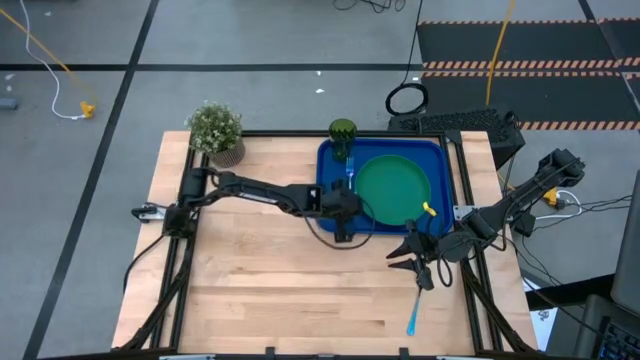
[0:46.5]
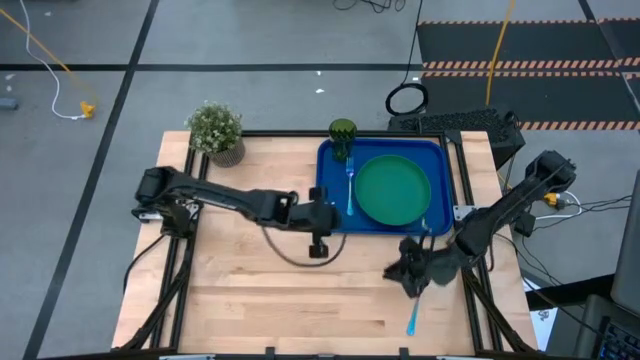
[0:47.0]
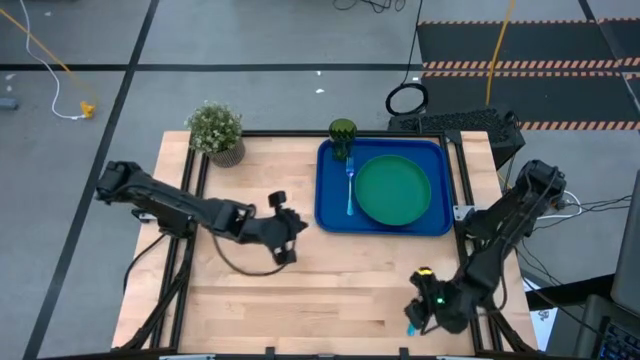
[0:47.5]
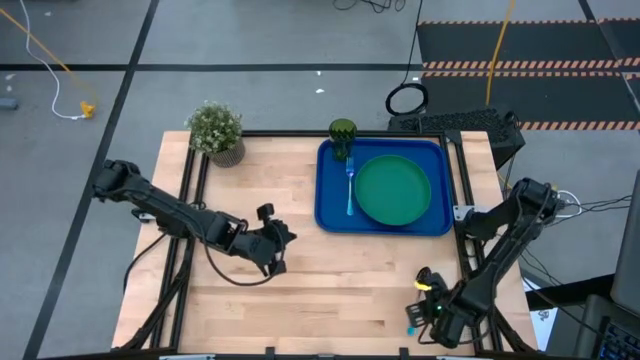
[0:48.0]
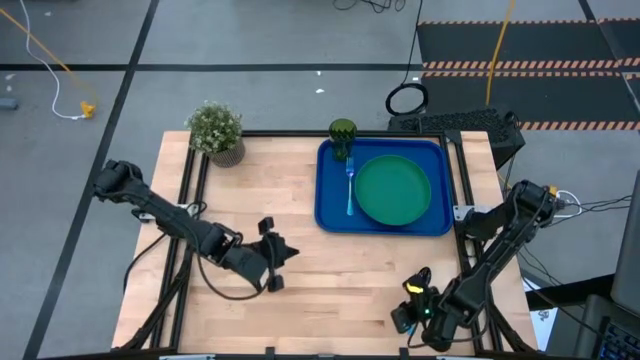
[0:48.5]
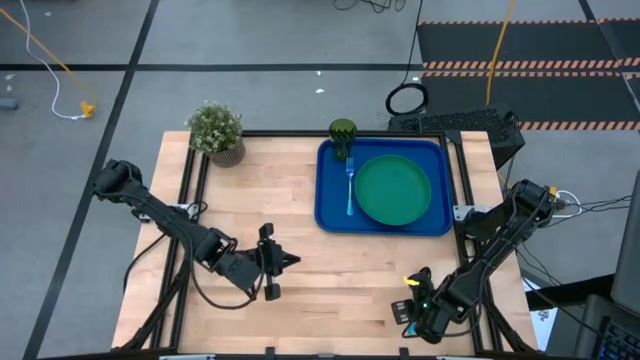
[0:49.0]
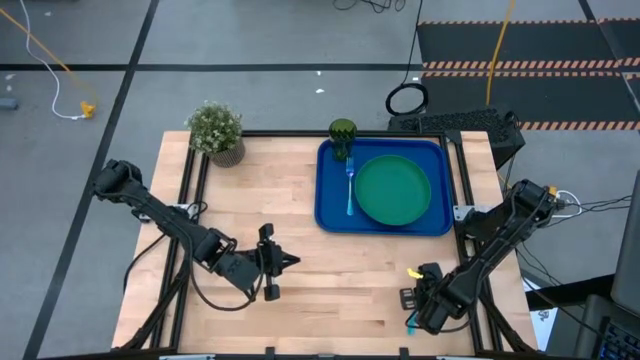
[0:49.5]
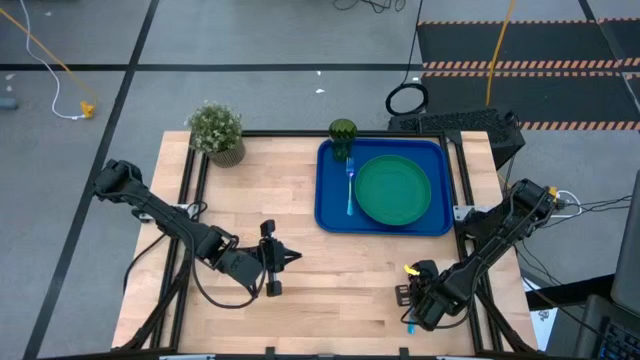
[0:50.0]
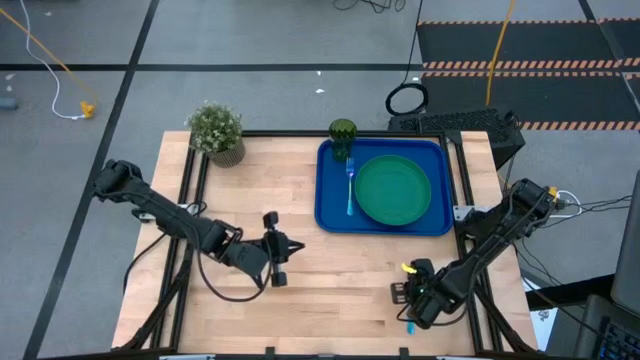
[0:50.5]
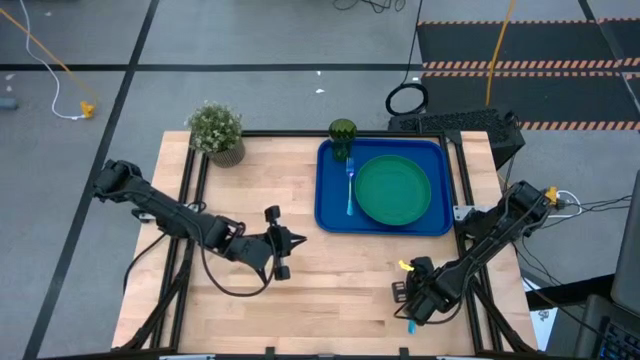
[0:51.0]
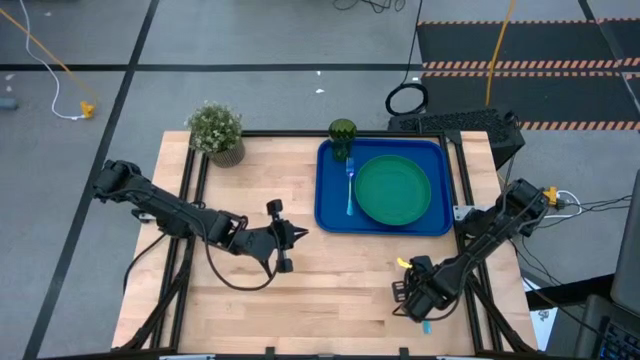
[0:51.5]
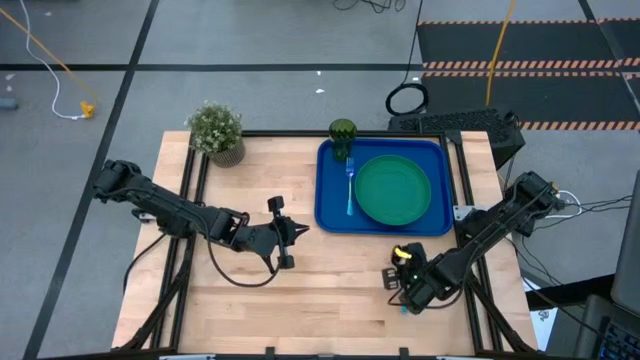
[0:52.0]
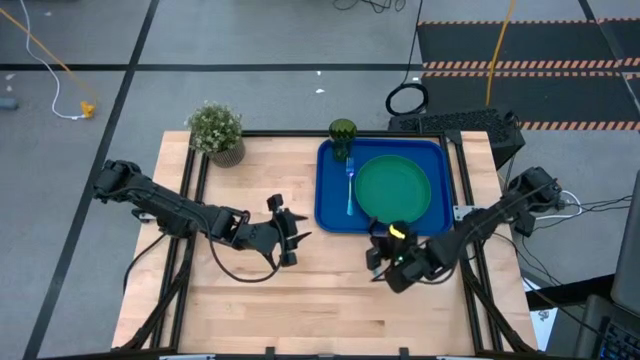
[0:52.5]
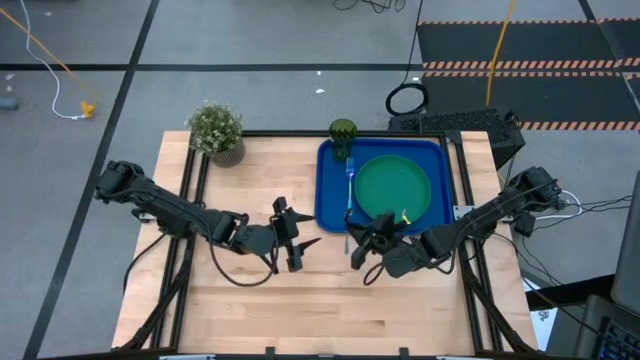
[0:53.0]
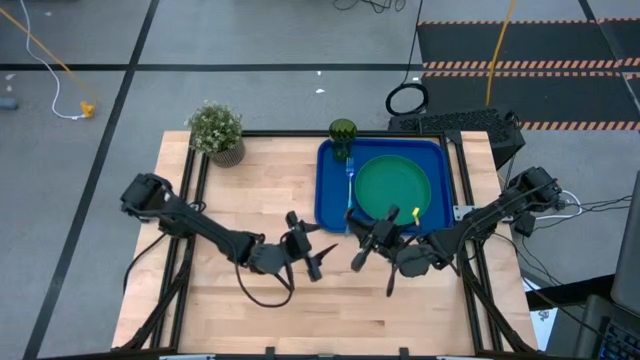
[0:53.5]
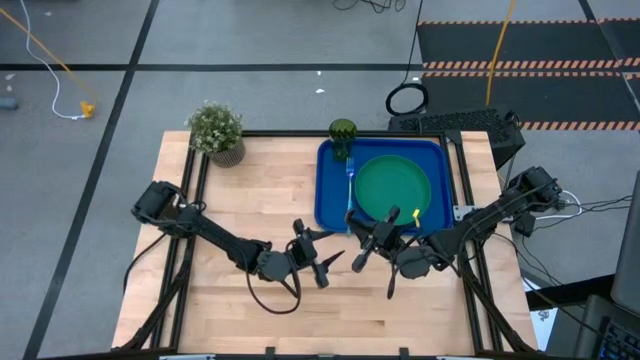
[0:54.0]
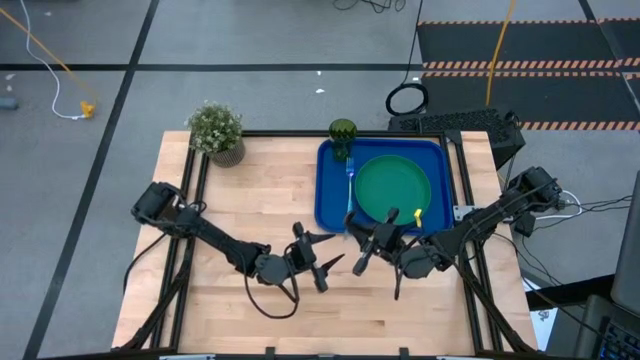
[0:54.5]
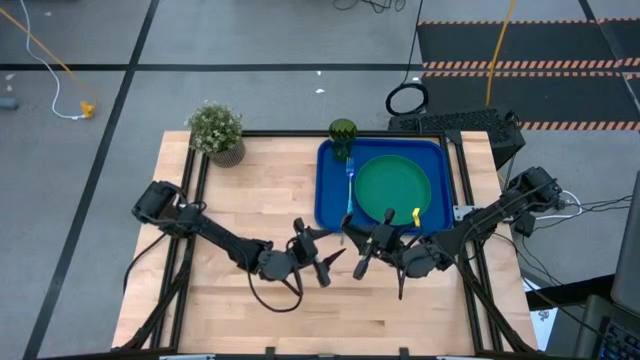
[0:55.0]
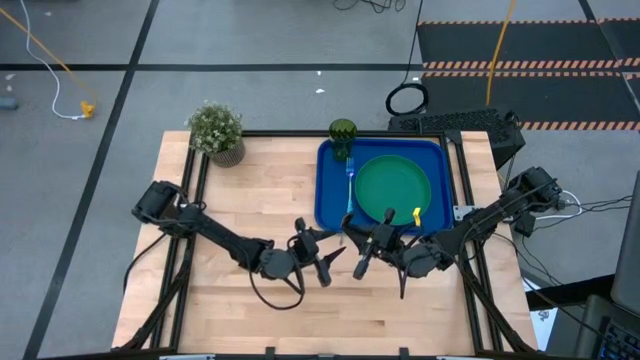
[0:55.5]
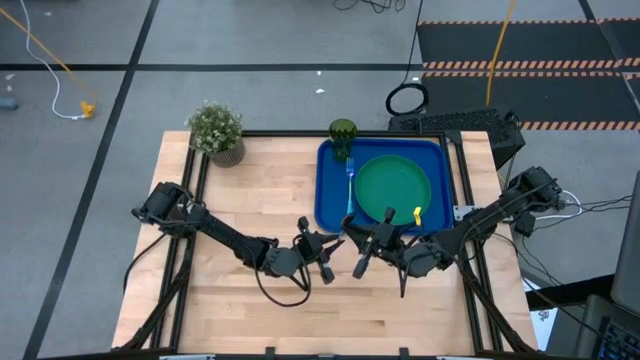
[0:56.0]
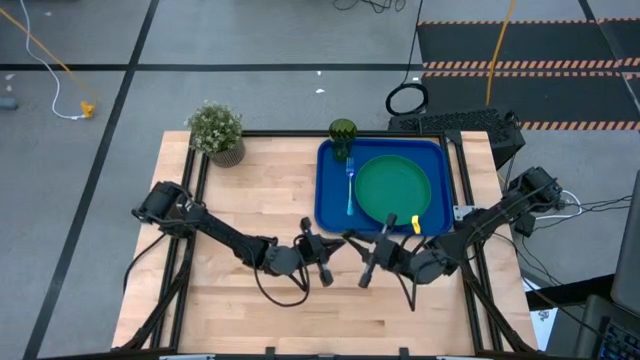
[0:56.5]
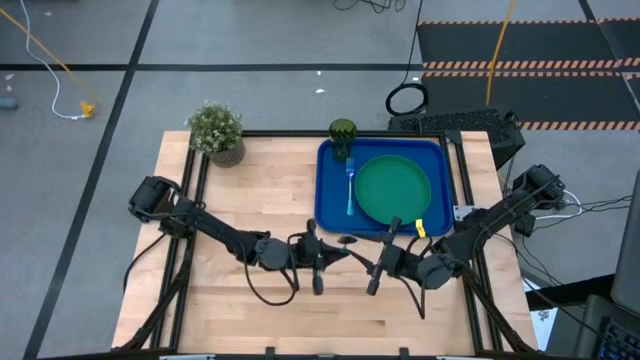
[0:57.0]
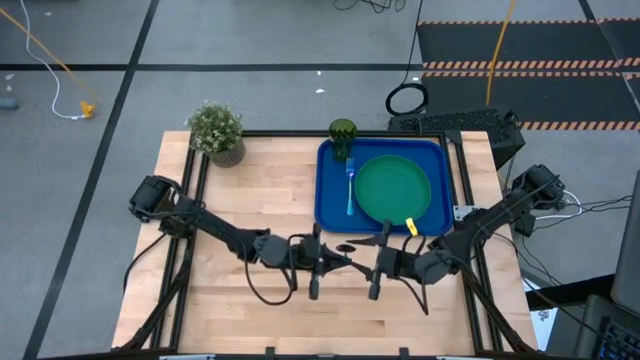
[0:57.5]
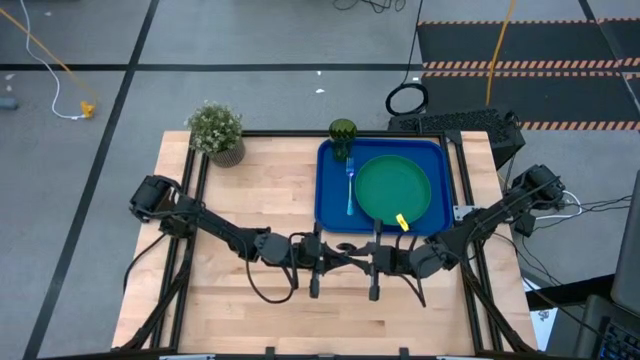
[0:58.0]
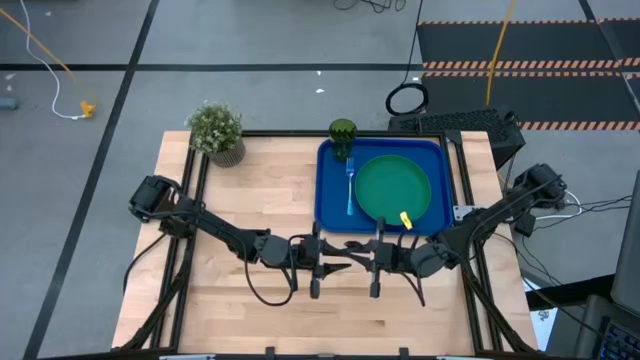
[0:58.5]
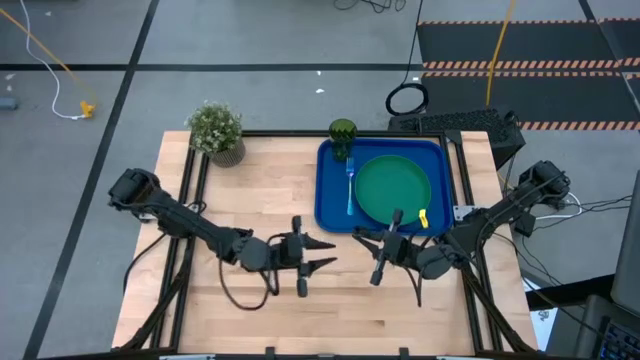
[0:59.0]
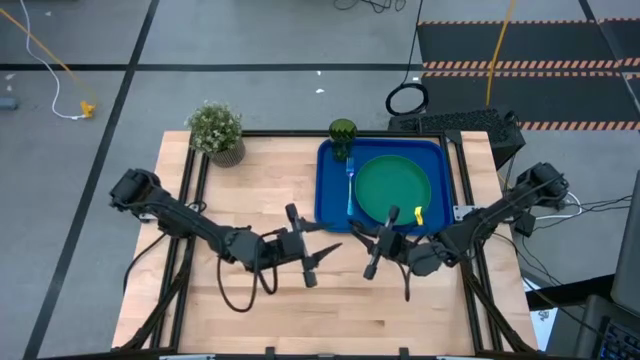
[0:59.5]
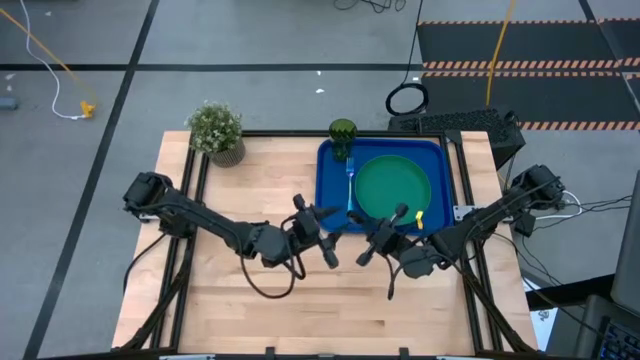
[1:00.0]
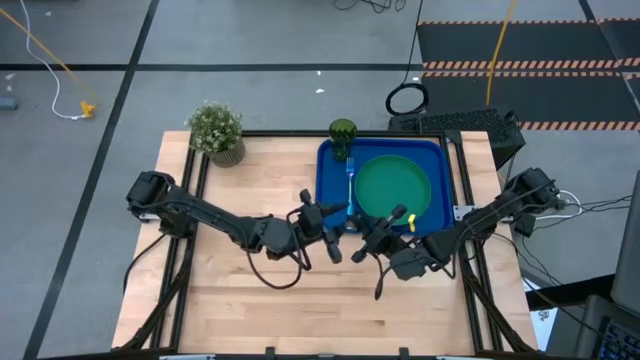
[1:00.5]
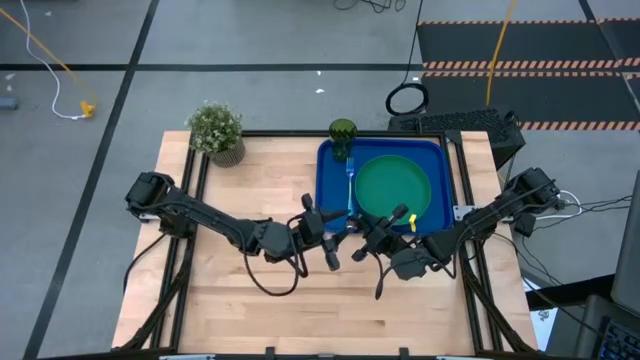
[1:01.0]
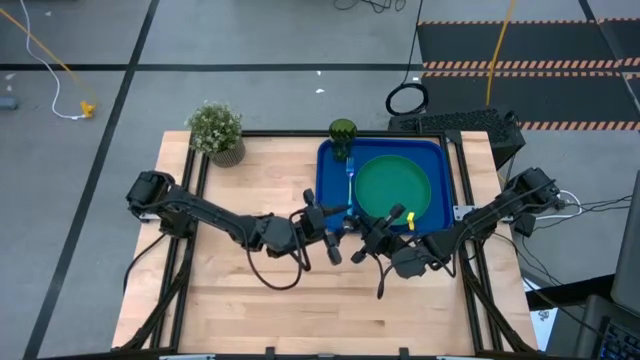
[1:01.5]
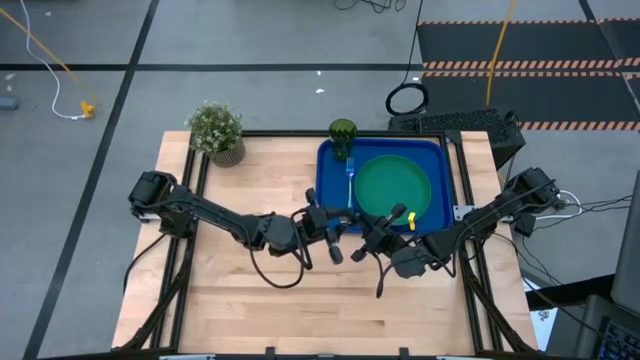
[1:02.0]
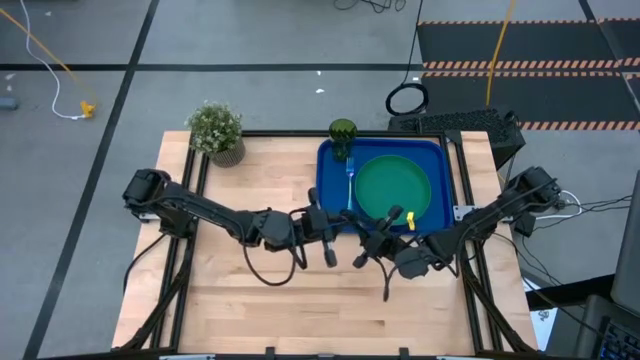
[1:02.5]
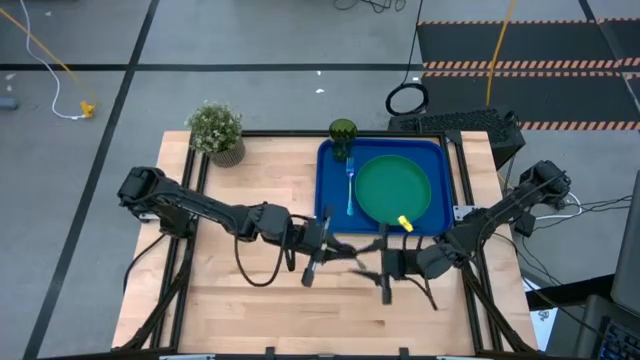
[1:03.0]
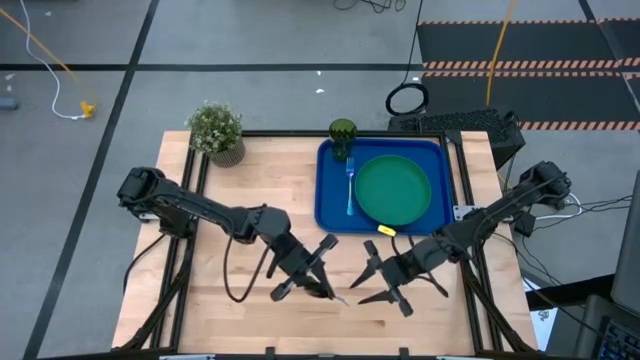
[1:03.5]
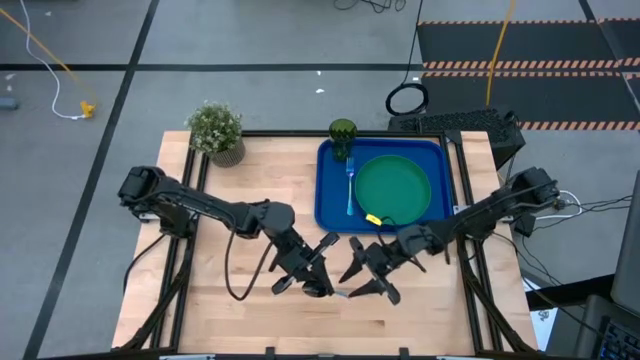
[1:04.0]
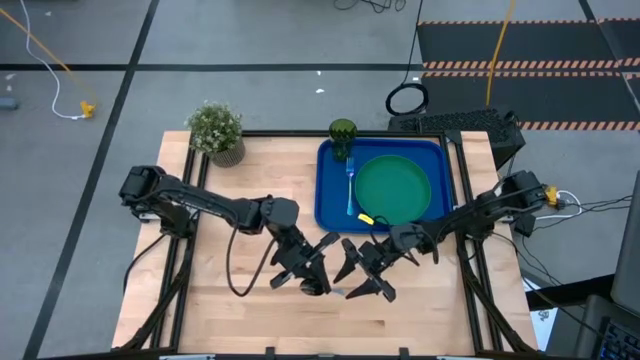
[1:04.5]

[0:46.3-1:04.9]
Task: Pick and place plate/cup/fork/spoon on tray
Put the blue spoon on the blue serving tray to the left of the blue fork

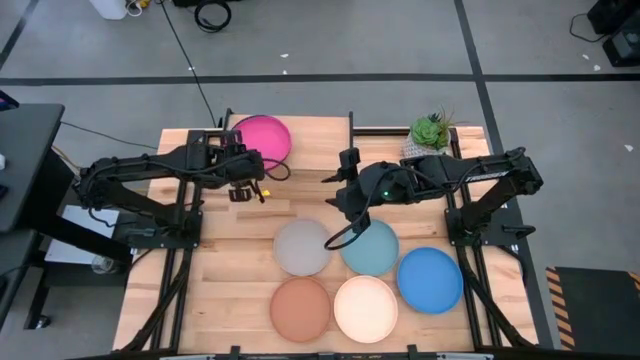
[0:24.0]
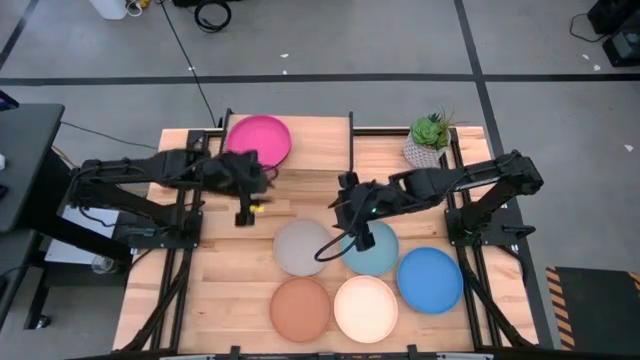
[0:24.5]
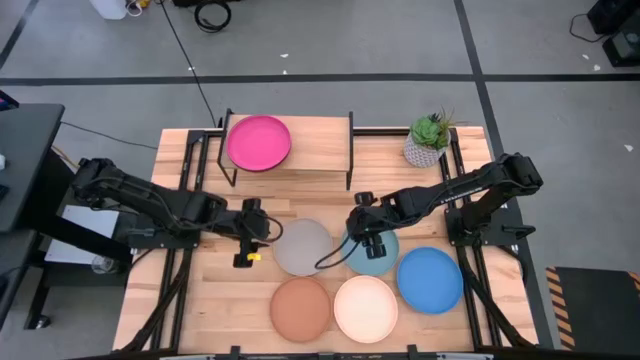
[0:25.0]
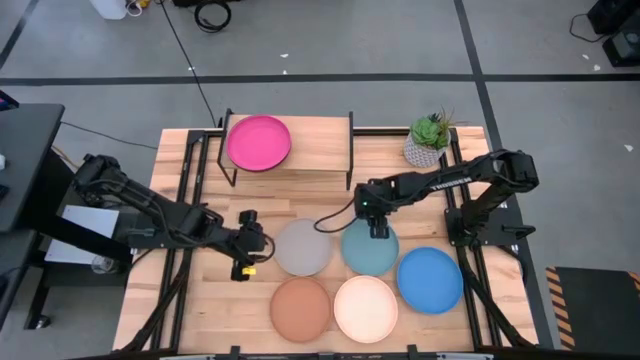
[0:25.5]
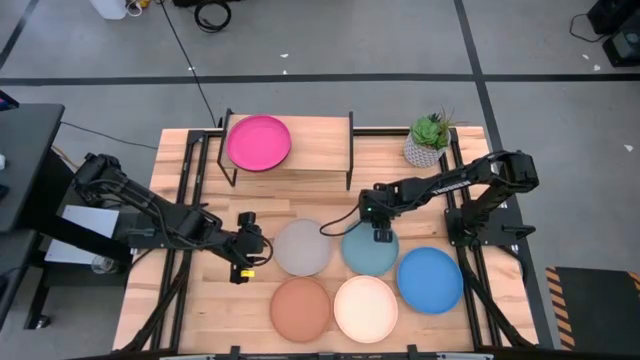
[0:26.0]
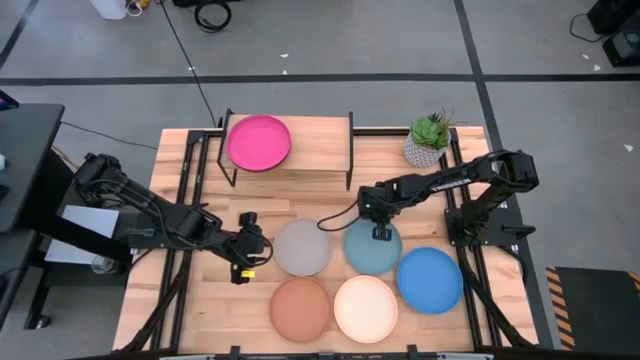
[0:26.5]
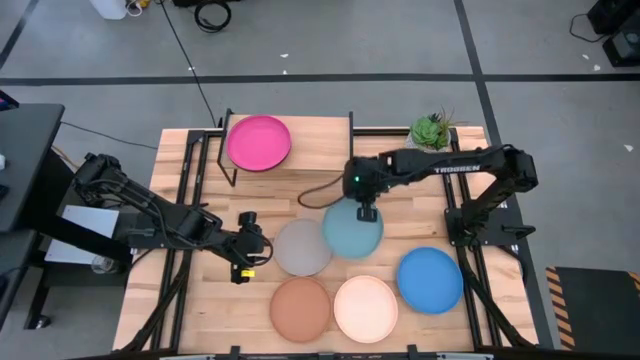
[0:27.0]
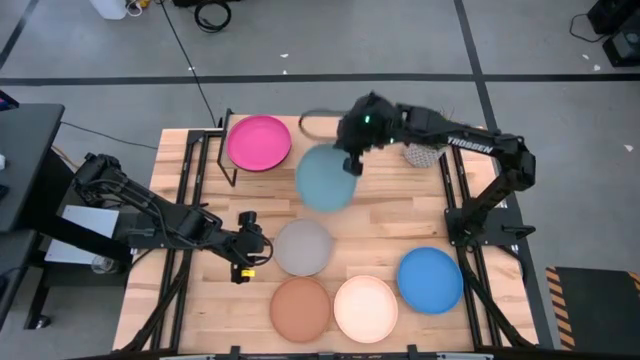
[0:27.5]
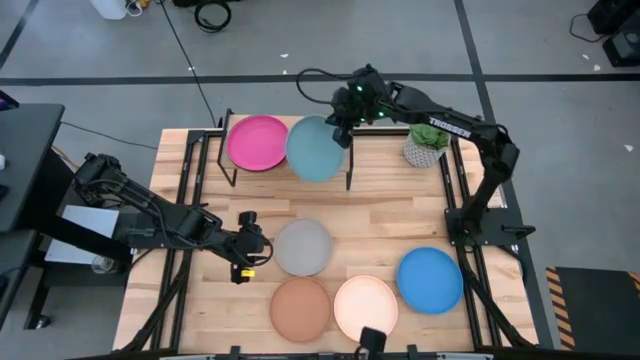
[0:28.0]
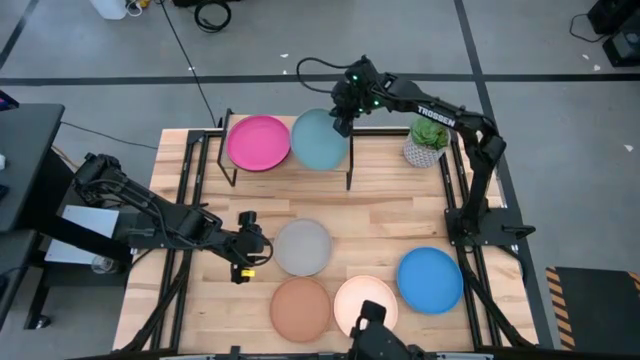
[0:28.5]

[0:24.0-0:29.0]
Task: Place and stack plates onto a shelf
Put the light blue plate on the shelf
